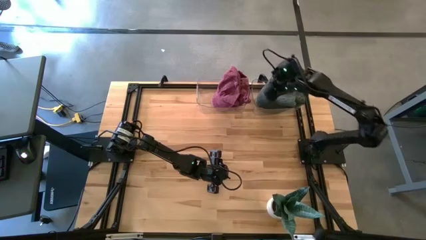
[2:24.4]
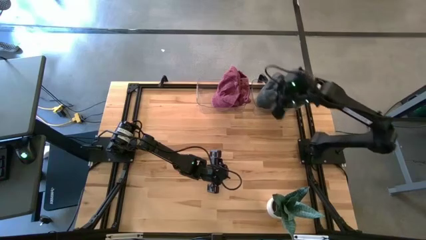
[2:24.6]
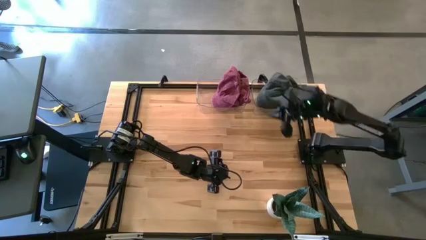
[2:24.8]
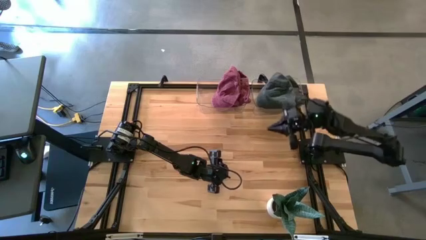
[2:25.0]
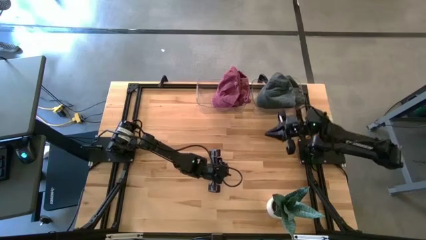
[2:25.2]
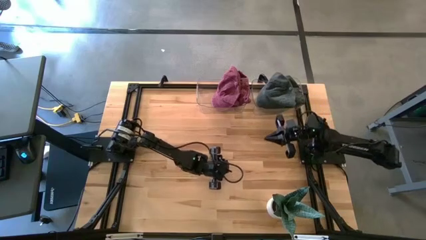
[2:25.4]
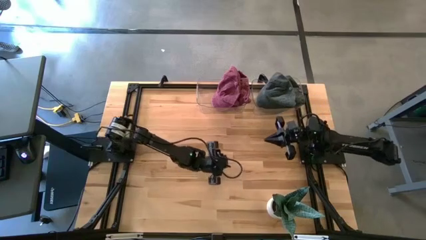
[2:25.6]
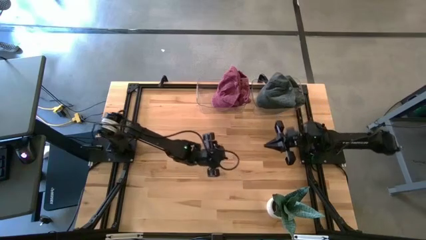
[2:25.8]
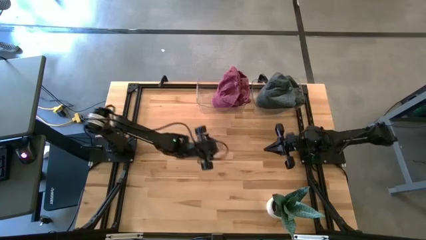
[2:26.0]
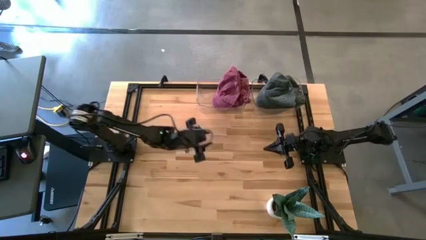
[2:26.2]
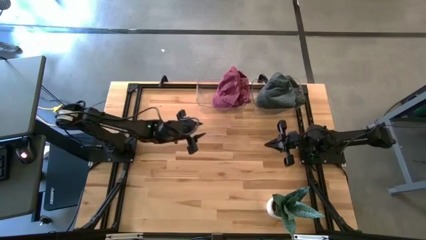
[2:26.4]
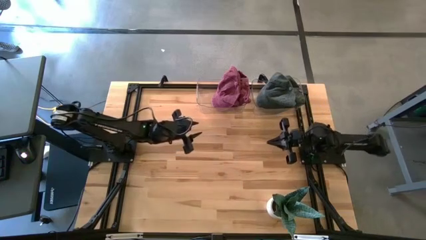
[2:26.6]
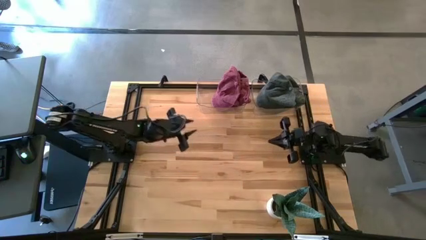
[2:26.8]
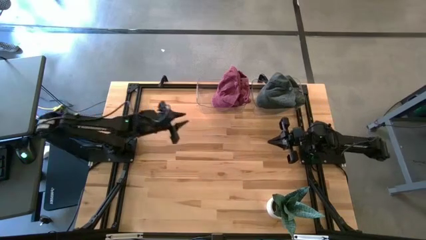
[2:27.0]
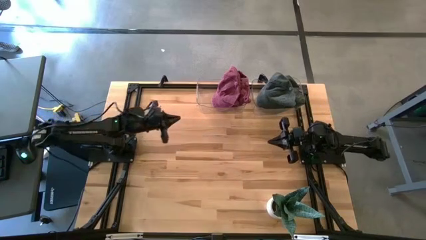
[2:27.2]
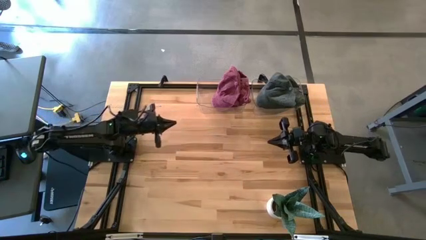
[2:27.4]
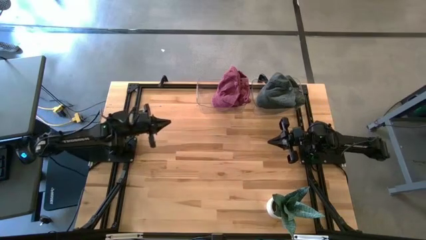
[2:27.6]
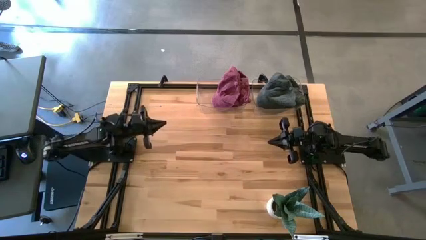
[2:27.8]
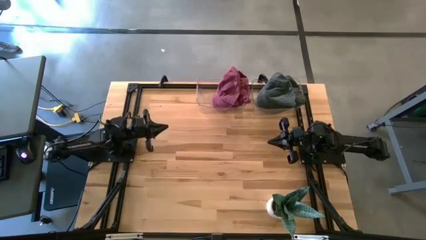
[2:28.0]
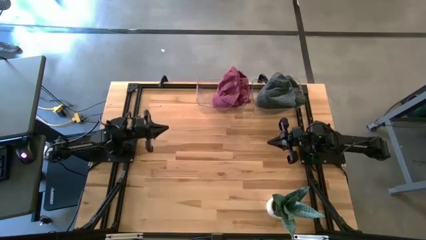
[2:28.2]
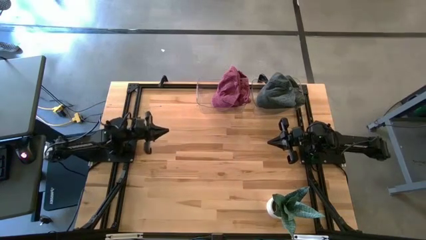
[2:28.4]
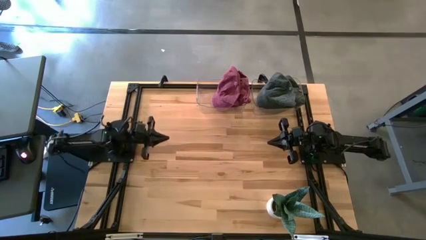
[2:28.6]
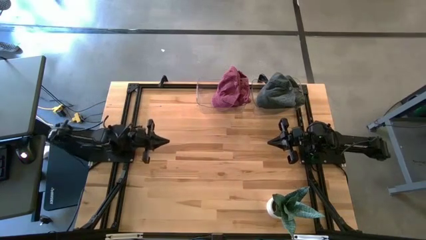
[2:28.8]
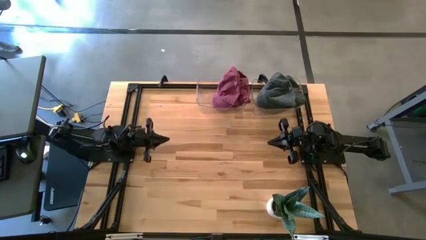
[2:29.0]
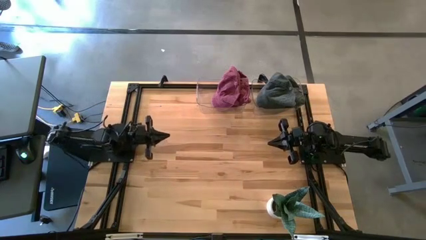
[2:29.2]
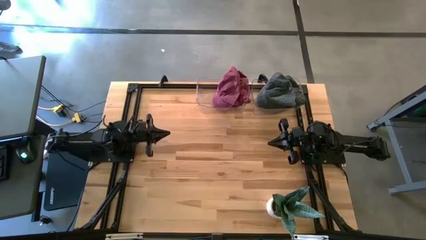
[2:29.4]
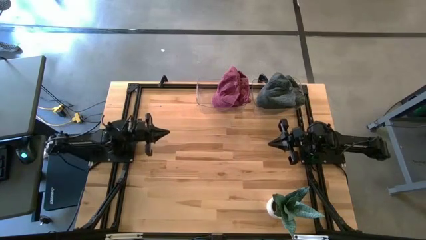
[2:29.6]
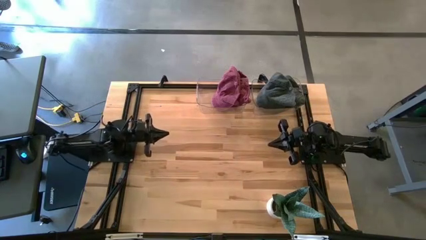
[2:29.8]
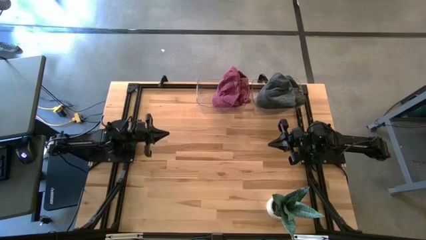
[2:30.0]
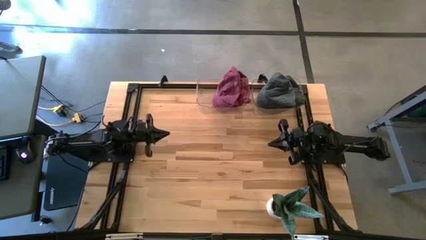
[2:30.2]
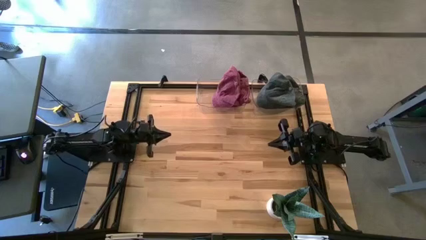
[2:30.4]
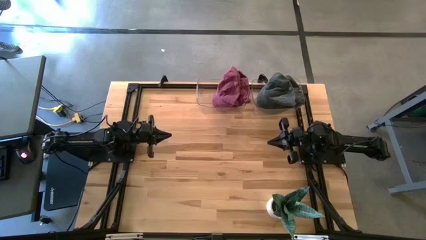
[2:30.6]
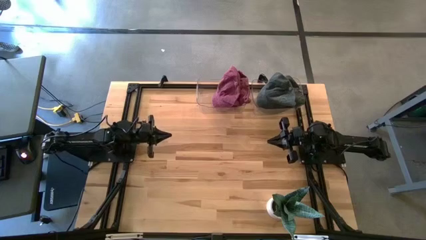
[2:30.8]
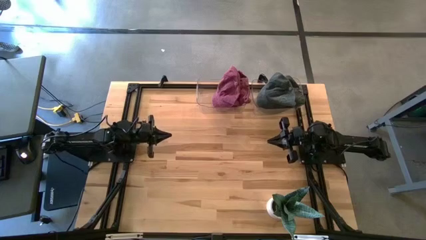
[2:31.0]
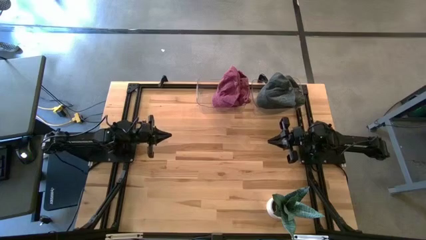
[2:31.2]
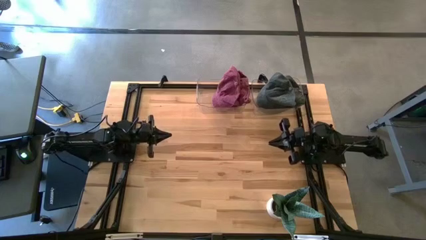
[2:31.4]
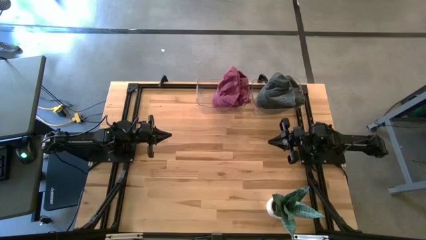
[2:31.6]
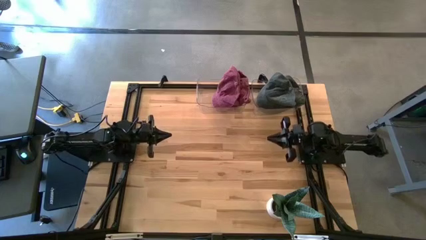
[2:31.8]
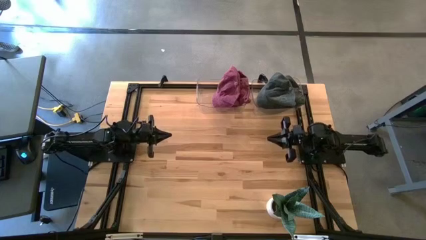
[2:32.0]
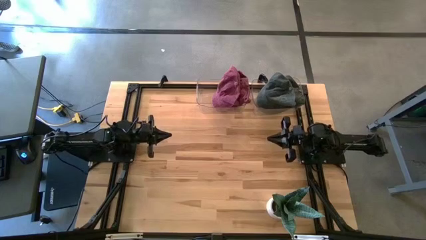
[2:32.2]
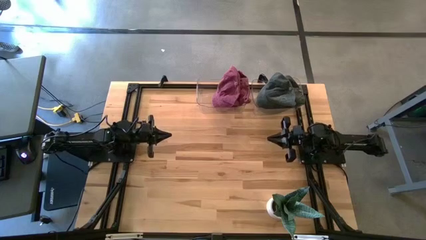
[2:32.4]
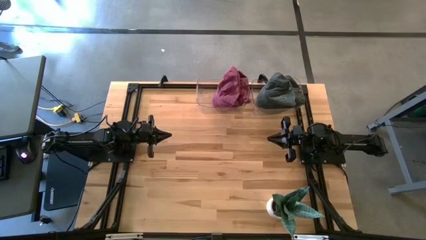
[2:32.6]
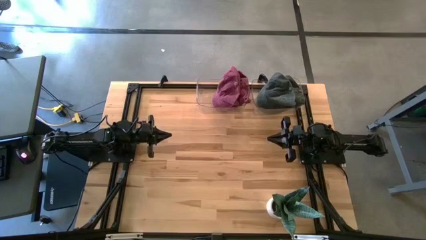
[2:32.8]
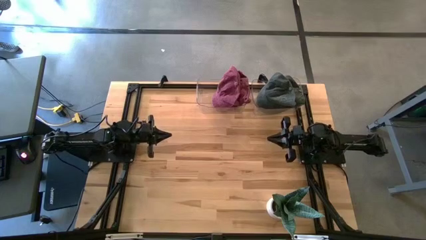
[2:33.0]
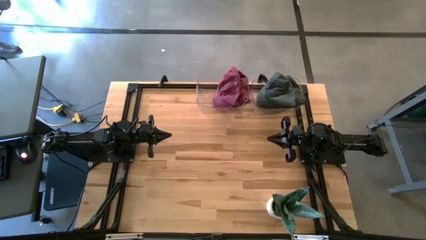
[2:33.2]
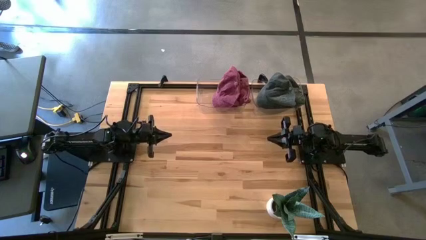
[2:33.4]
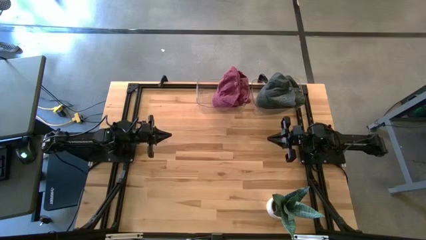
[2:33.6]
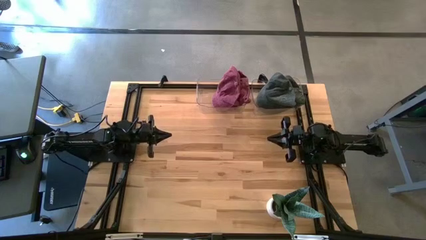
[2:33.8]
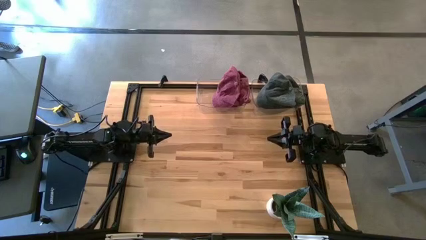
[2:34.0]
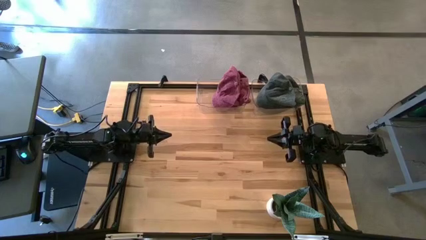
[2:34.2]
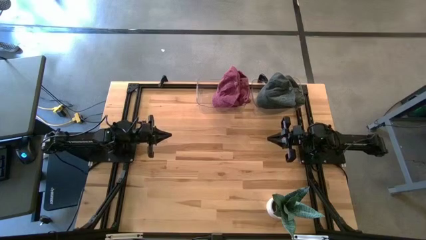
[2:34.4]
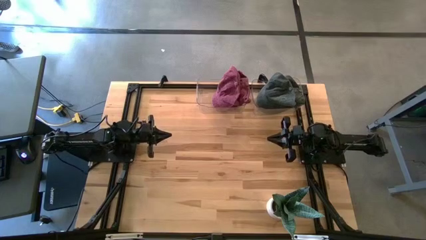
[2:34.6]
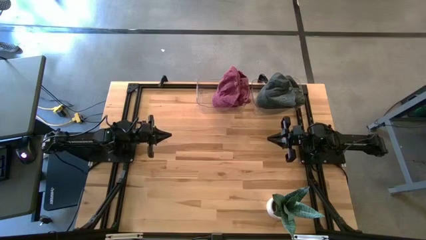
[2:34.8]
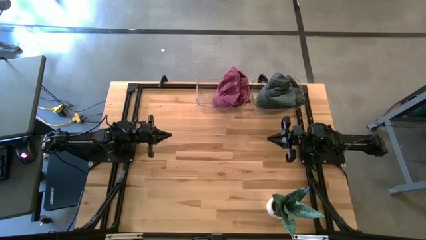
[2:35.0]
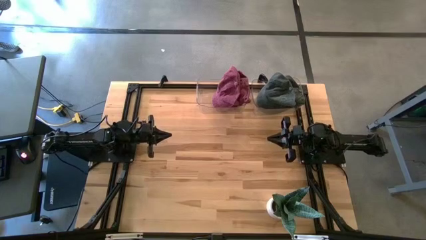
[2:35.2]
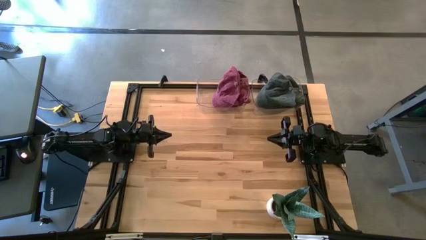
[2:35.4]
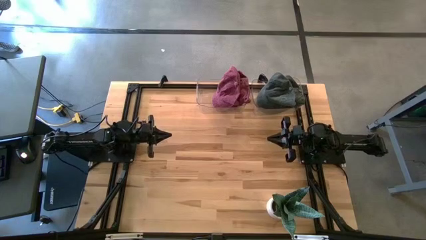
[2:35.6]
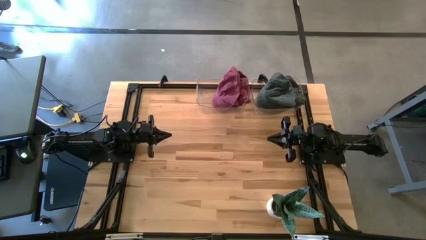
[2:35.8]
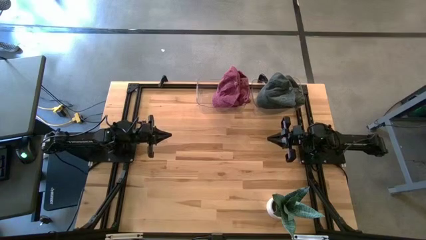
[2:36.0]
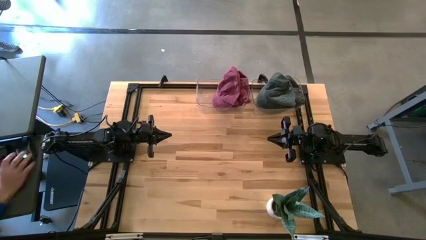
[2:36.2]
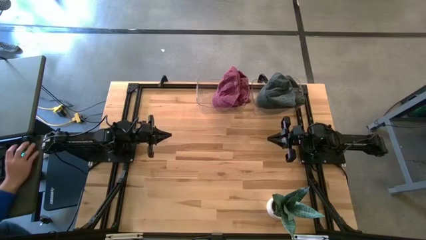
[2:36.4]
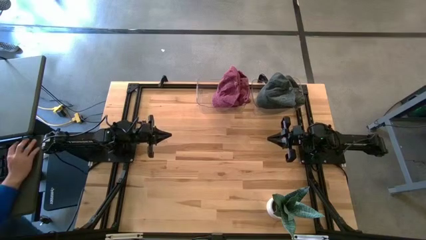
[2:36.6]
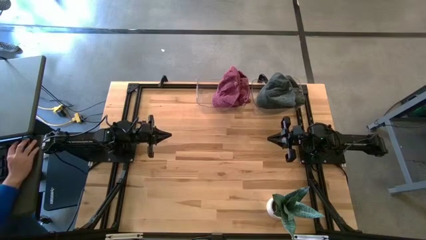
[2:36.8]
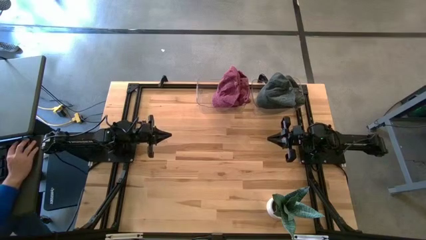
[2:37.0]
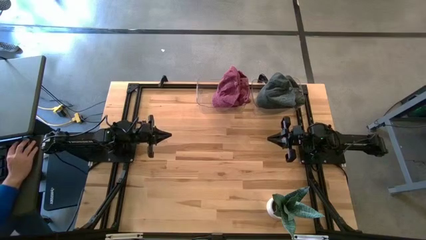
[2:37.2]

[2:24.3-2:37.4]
Task: Pick & Place hat
Return to Home Position
